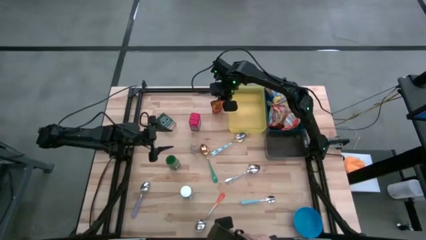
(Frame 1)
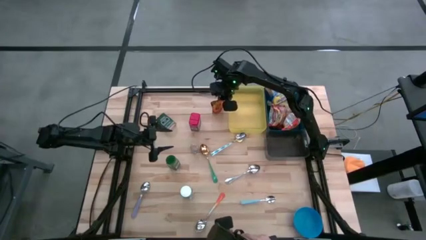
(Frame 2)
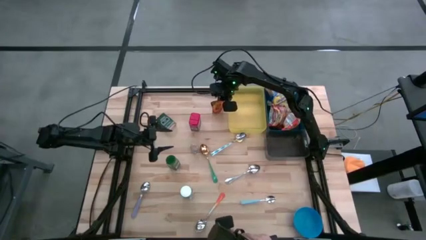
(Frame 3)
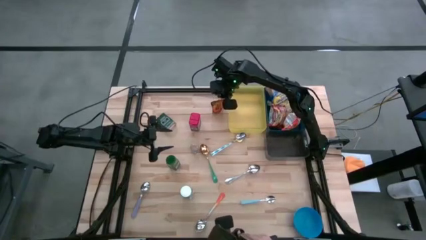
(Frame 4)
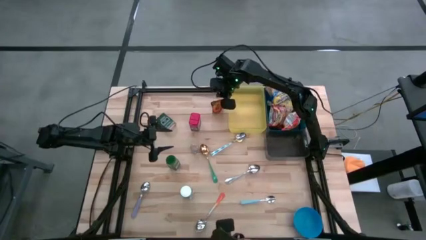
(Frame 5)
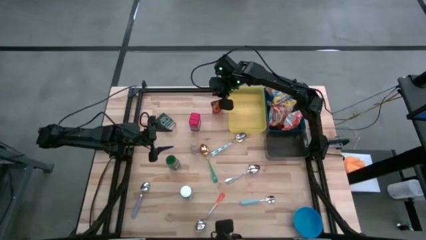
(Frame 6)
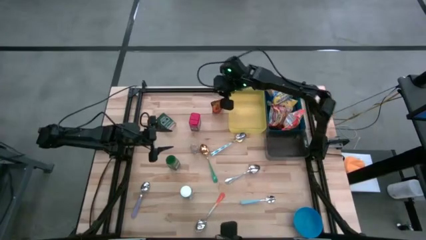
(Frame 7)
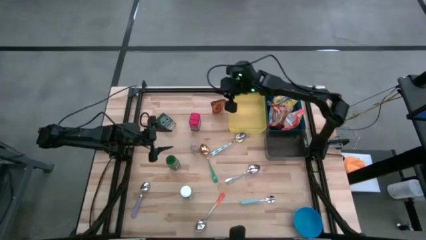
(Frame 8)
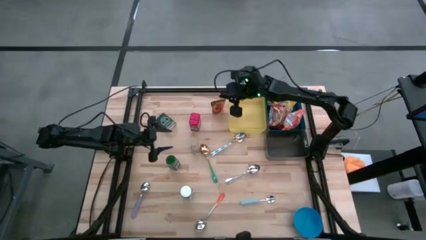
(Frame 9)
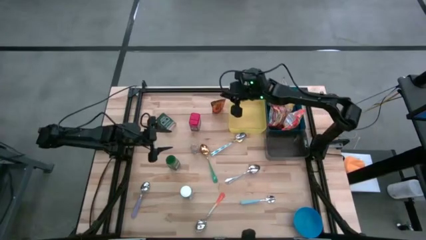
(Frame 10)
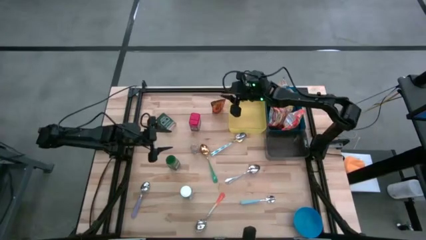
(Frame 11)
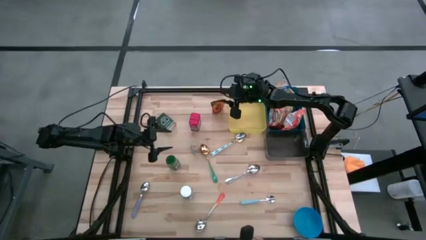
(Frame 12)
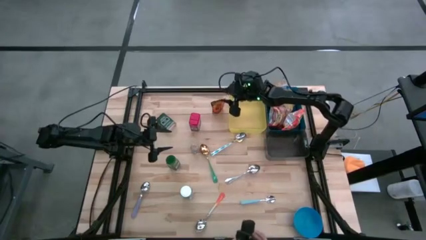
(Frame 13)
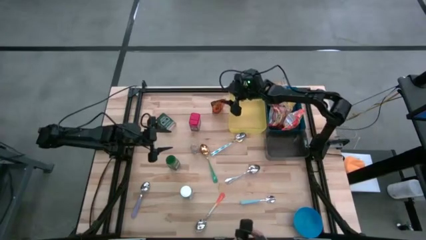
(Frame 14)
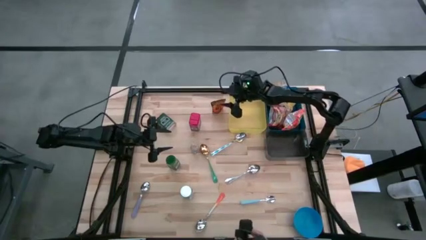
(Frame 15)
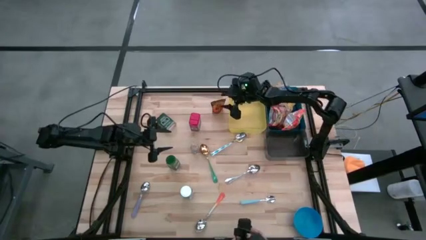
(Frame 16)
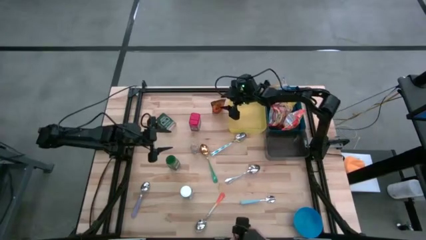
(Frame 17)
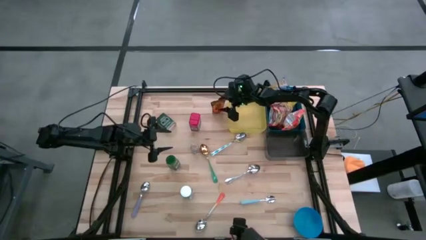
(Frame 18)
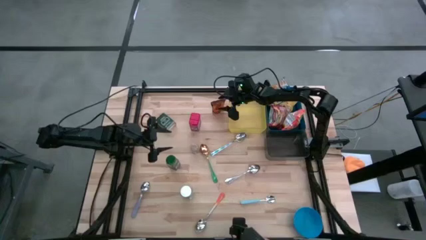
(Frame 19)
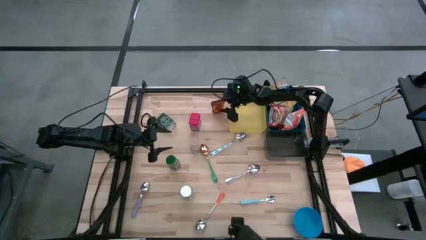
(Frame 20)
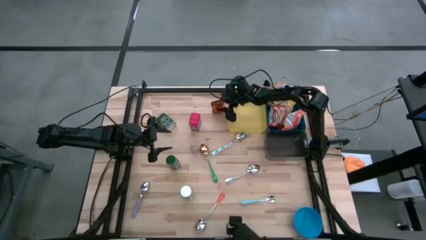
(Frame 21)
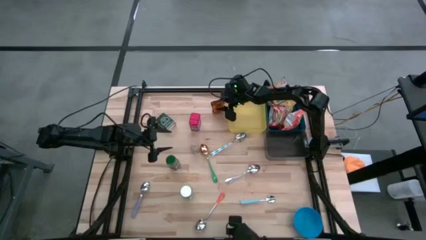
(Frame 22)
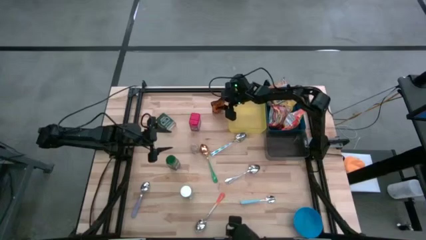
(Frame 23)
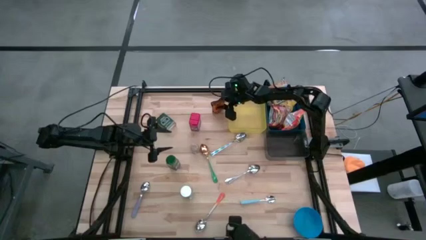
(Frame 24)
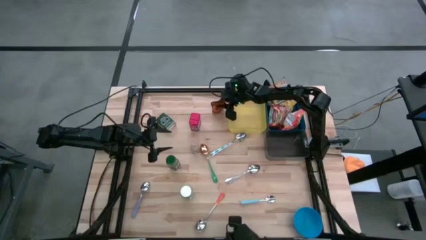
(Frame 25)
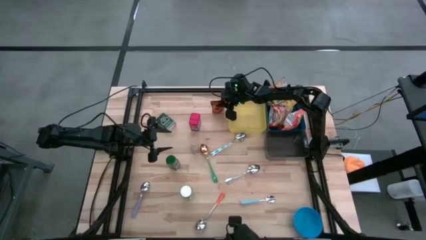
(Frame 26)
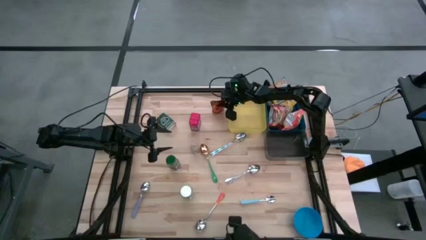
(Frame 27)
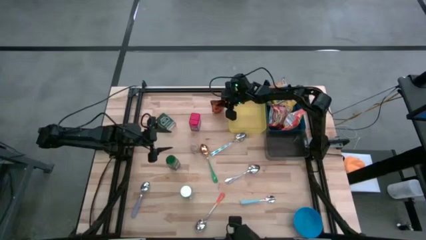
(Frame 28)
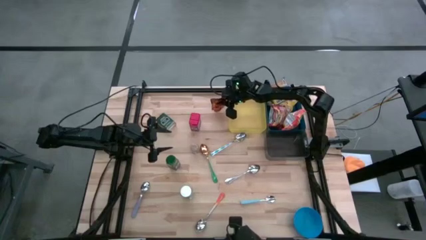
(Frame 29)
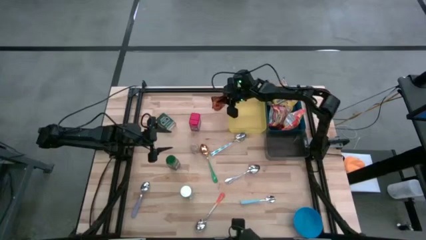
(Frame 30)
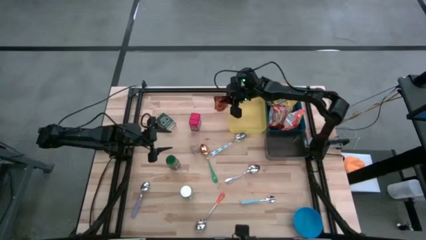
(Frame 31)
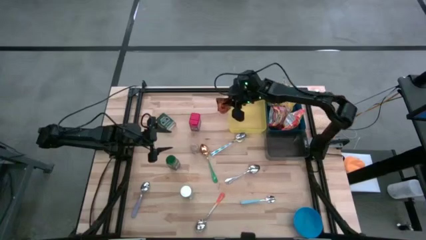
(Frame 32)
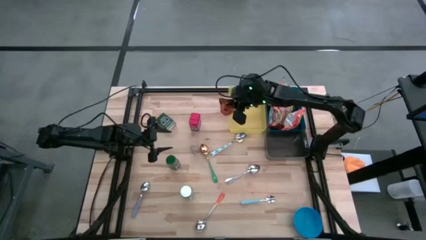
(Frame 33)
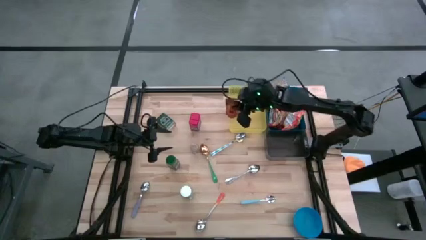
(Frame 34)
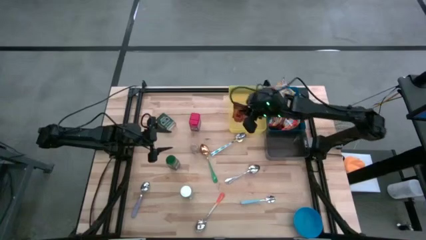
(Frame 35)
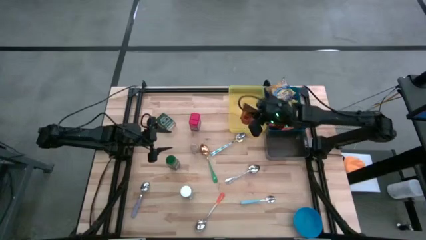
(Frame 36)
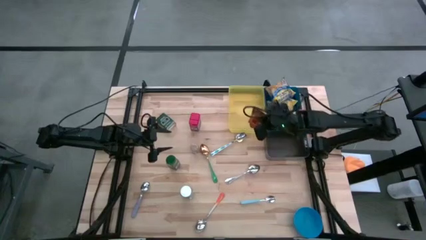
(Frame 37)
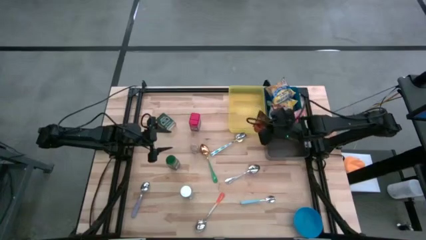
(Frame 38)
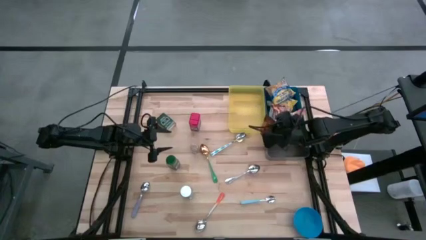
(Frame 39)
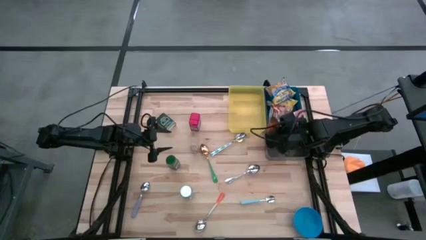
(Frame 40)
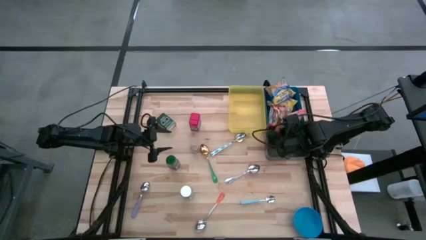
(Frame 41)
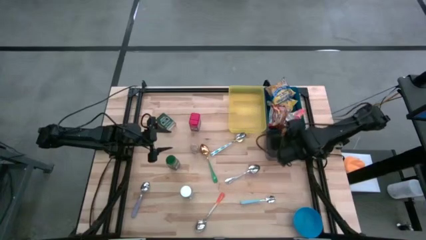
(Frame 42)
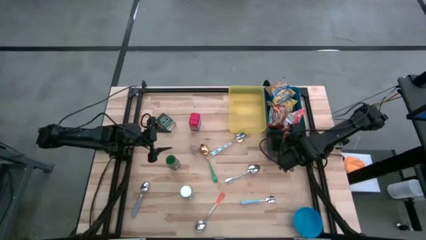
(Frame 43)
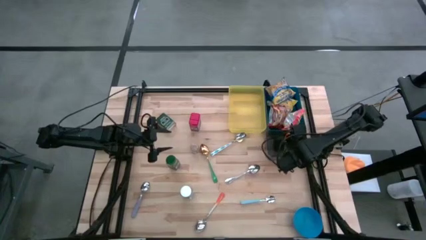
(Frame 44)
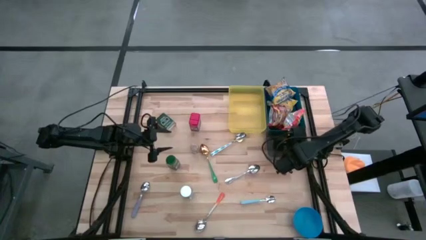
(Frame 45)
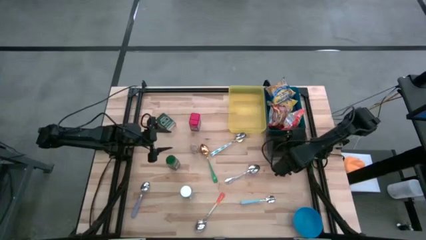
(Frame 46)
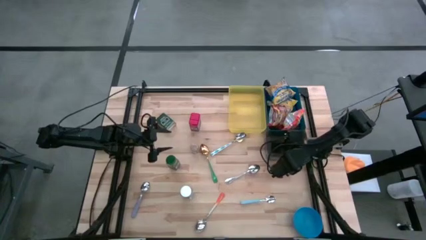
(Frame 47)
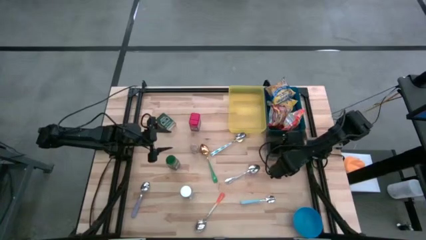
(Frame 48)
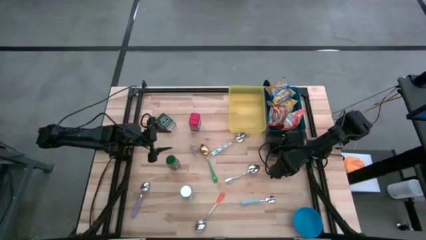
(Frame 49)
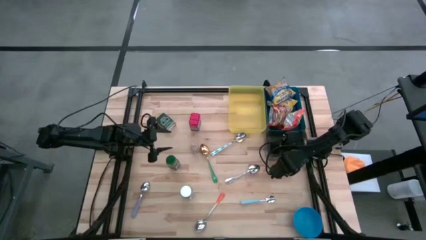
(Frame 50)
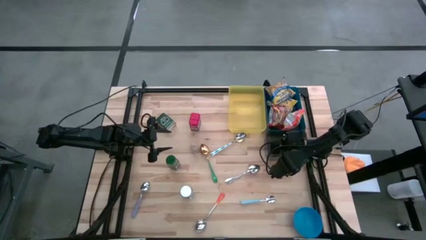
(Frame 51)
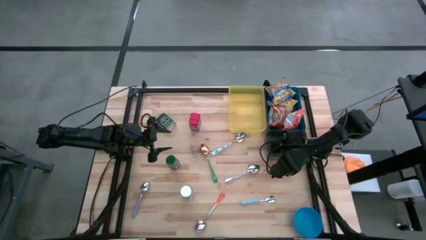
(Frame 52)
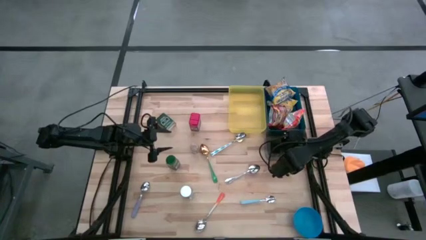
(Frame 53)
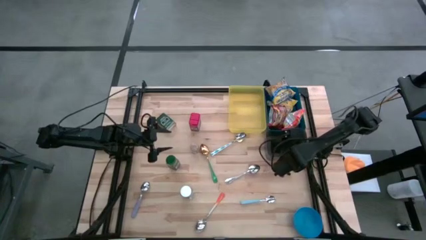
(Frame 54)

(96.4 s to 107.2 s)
Put the orange seasoning bag into the black bin
